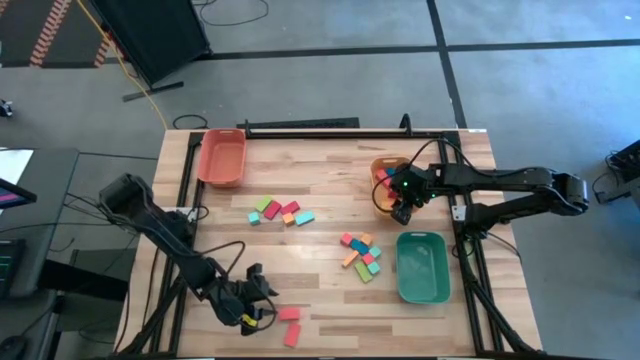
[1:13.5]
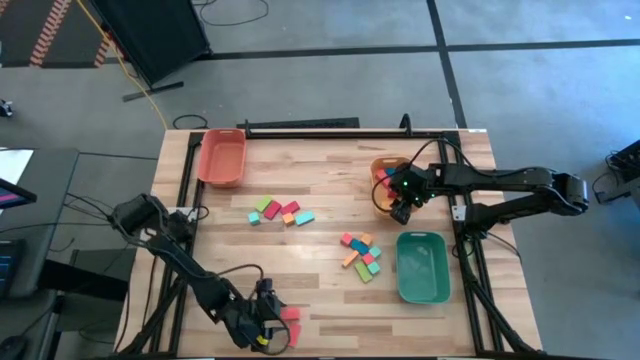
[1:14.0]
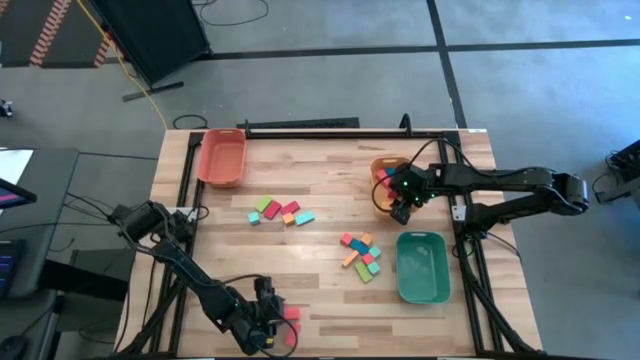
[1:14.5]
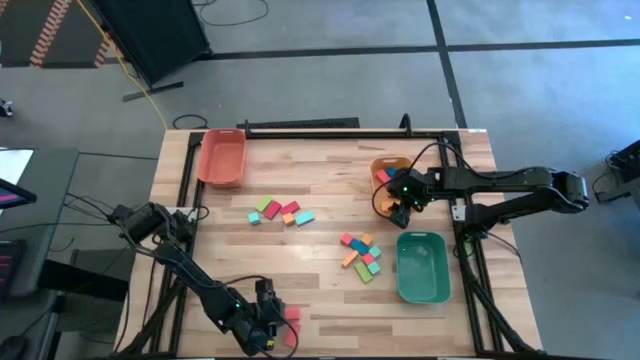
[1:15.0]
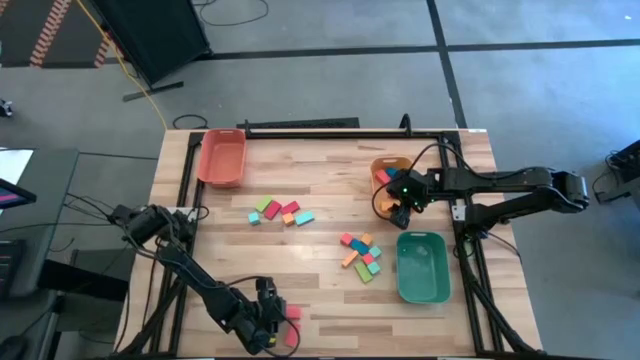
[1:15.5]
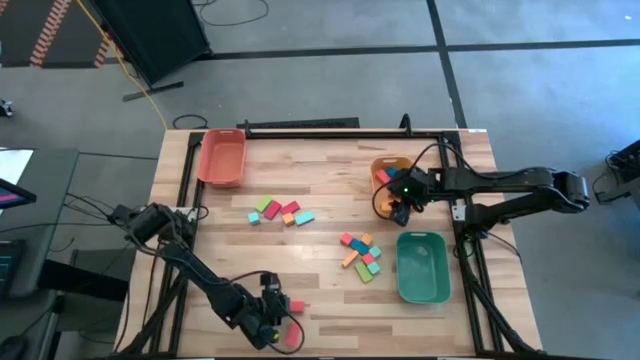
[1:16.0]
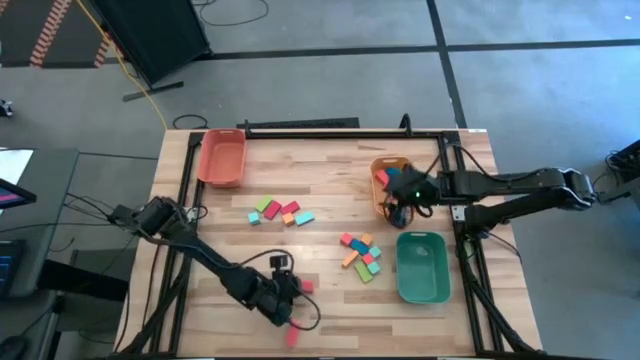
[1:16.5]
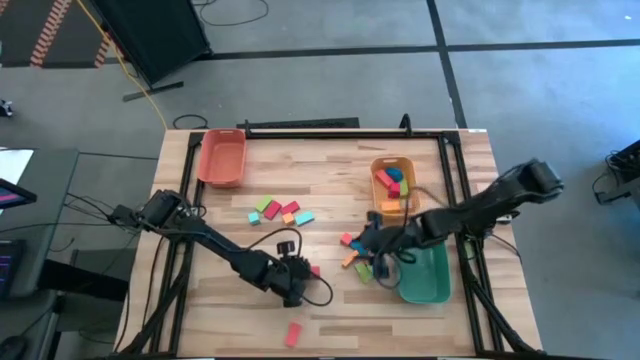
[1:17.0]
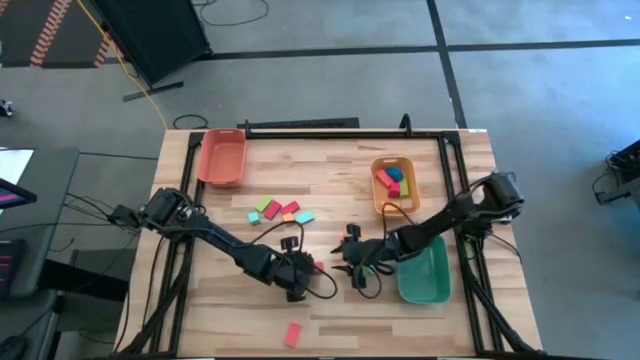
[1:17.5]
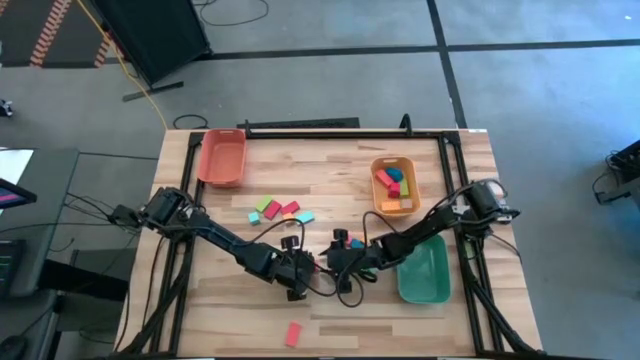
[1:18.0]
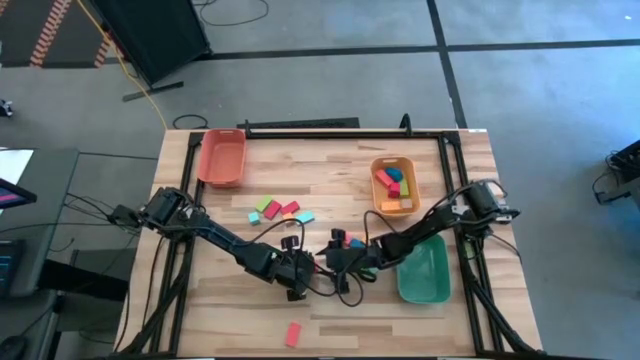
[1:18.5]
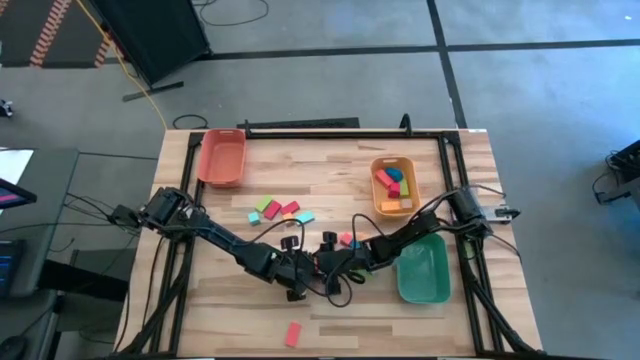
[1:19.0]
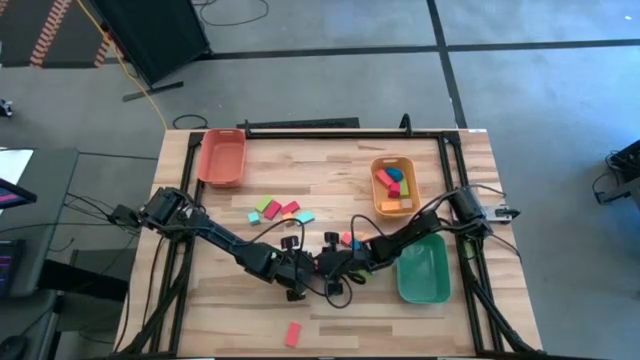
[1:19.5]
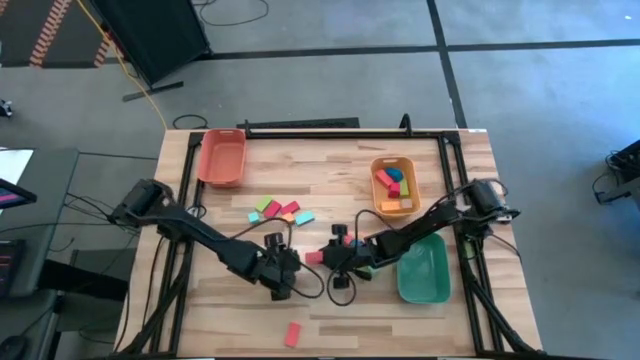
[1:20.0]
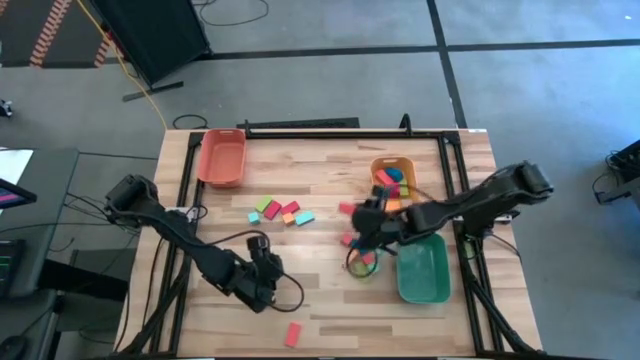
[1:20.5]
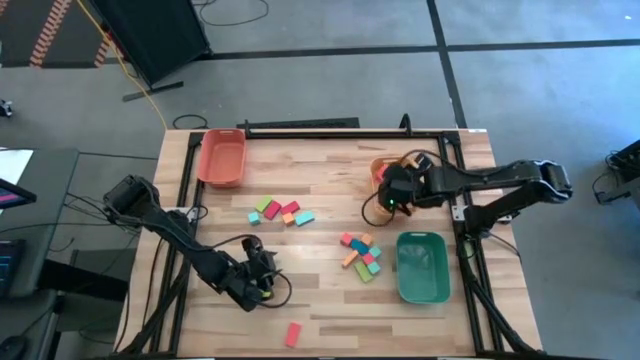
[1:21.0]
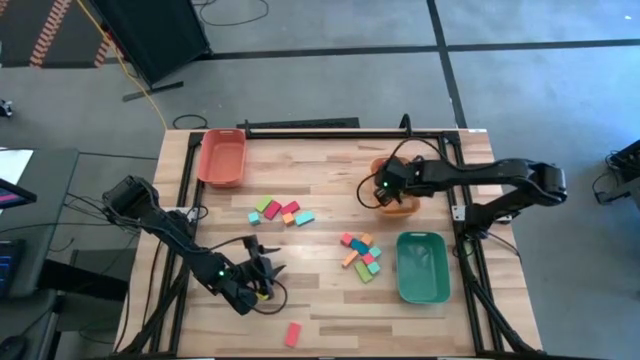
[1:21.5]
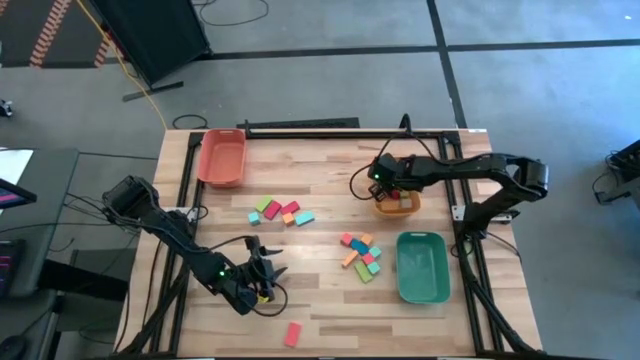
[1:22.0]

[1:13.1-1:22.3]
Task: Sort blocks by size
Put the large rectangular orange block into the yellow bin

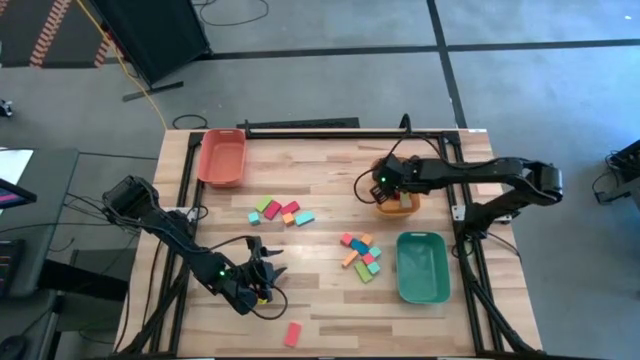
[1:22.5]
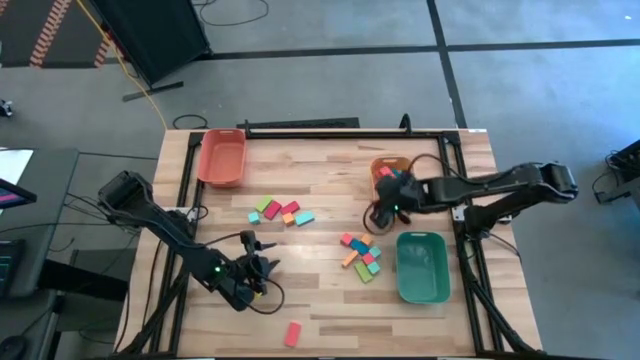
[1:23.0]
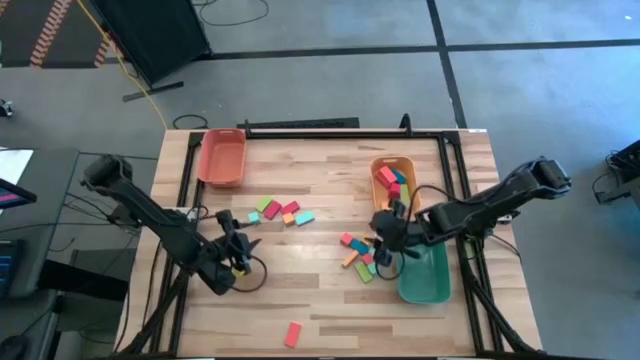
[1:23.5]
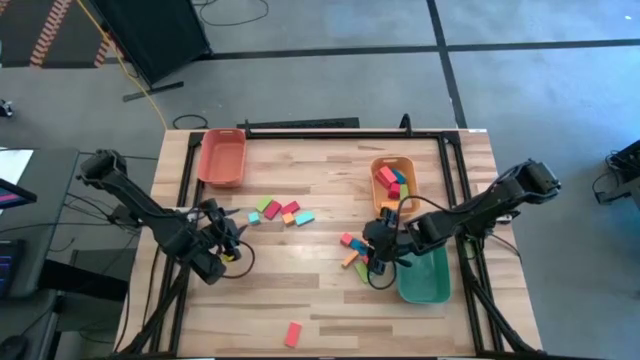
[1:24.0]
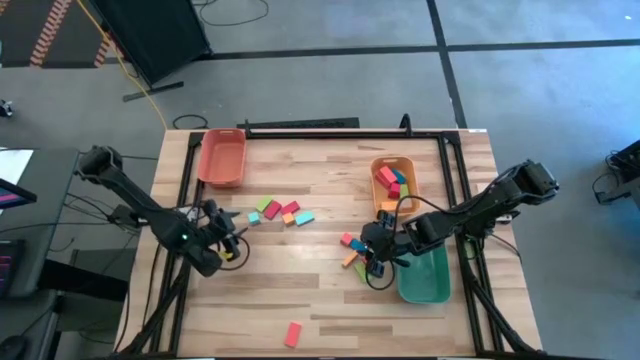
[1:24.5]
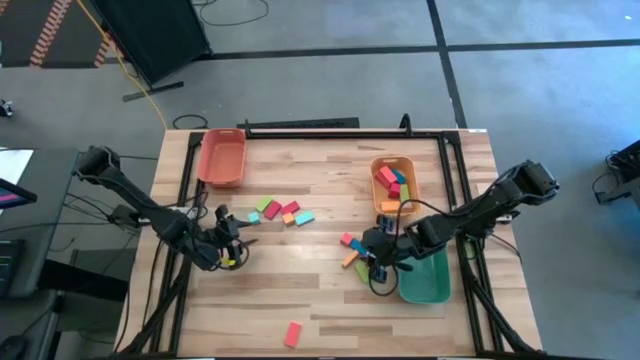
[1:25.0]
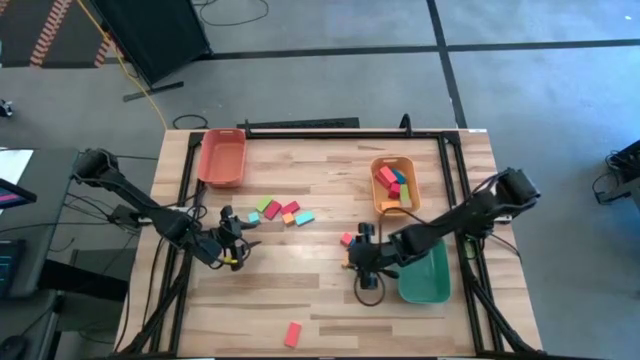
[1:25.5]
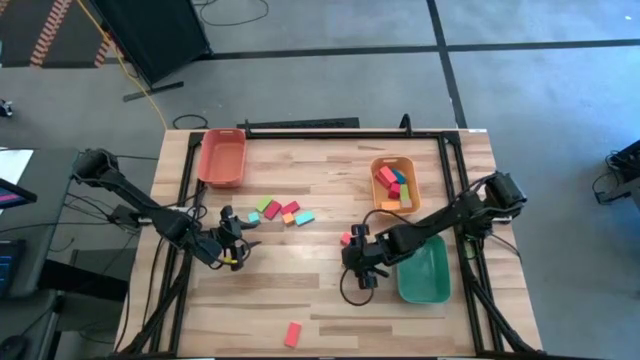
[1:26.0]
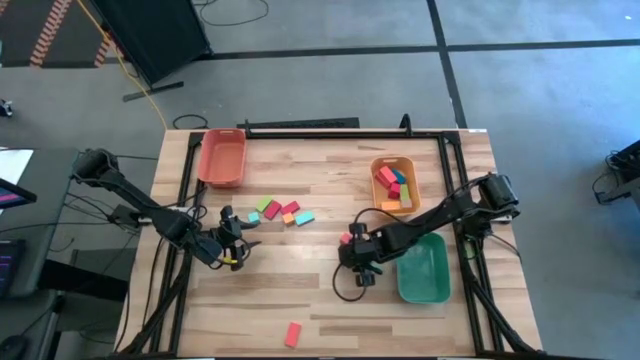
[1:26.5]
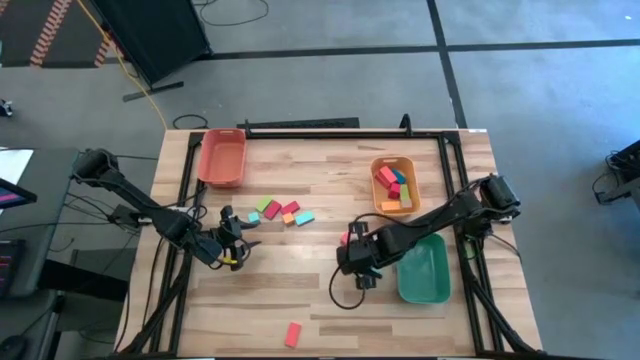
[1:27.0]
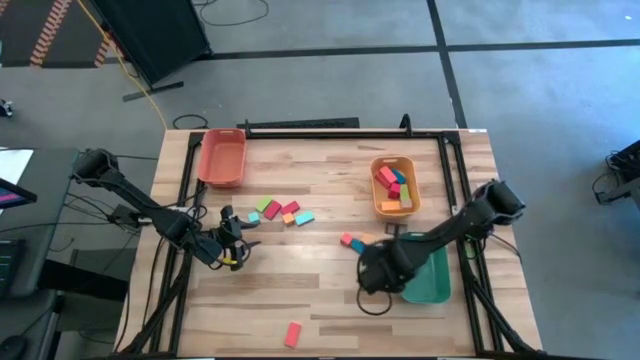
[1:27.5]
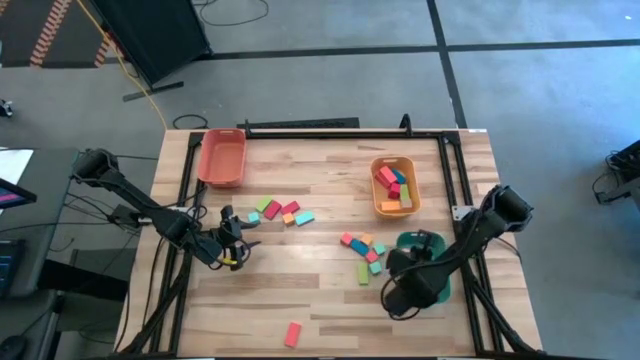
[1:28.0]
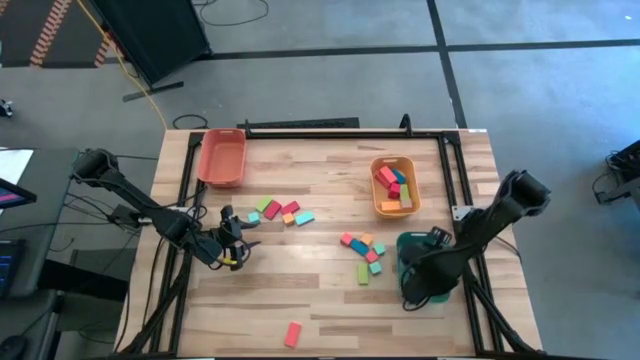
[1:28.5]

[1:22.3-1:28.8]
Put the small rectangular yellow block into the green bin

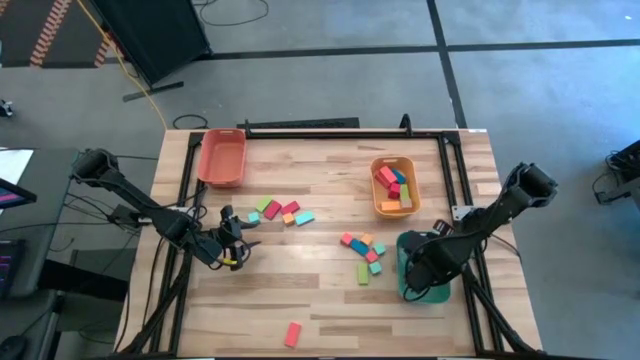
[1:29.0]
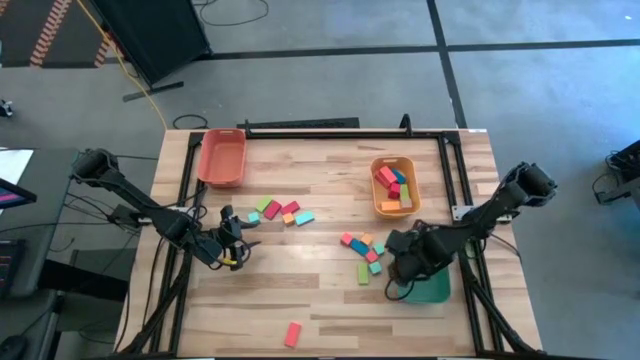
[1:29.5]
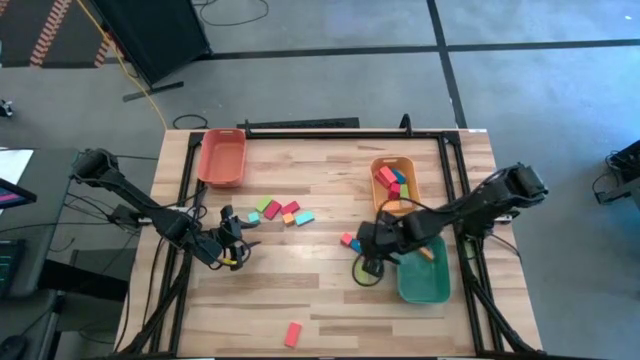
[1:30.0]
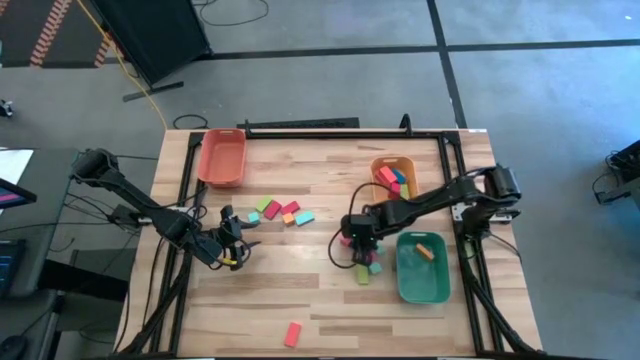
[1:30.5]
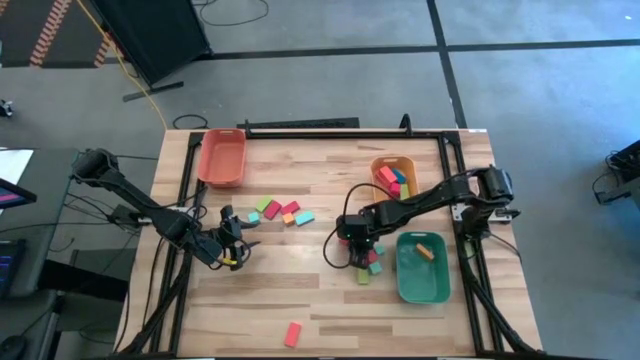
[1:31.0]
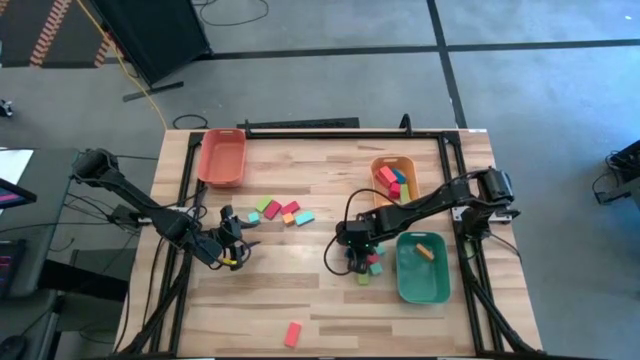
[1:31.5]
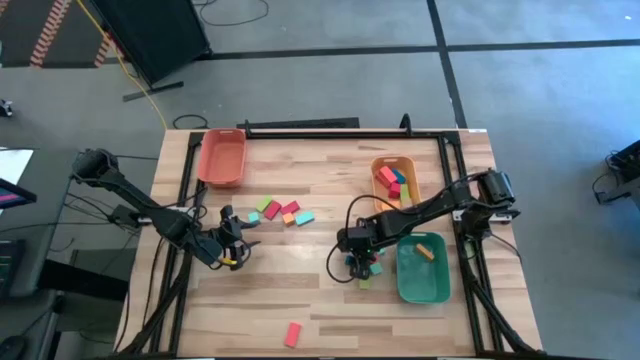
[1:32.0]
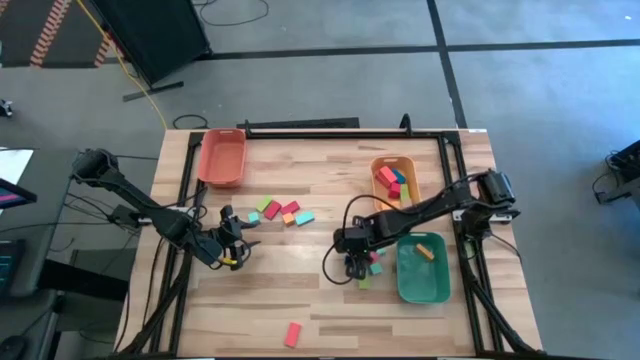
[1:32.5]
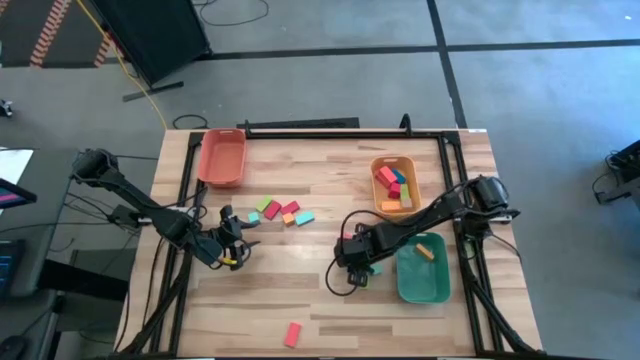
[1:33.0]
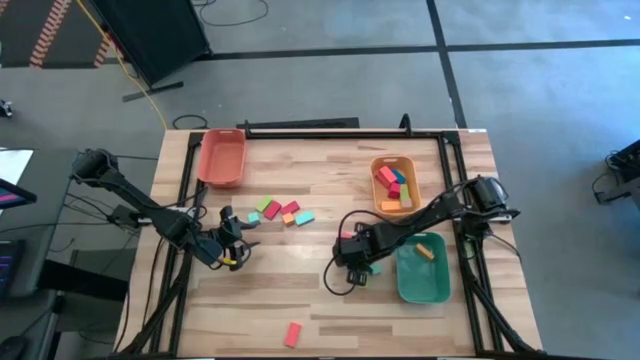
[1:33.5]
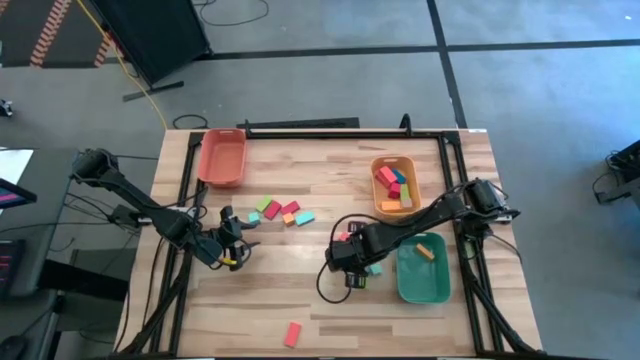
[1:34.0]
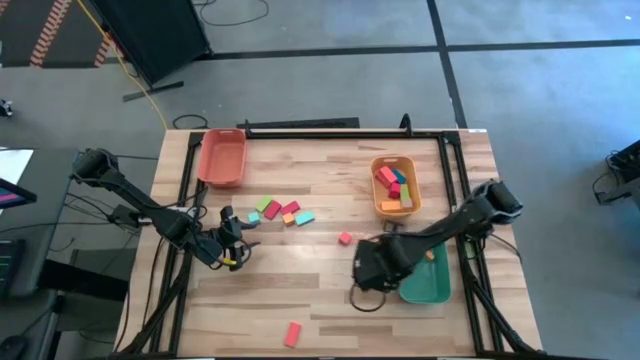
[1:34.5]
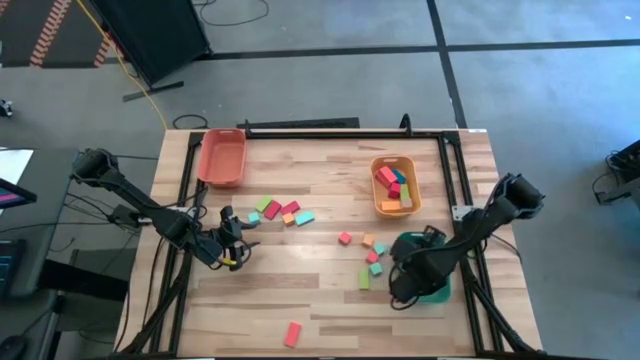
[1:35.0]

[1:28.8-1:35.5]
Put the small rectangular dark blue block into the green bin
